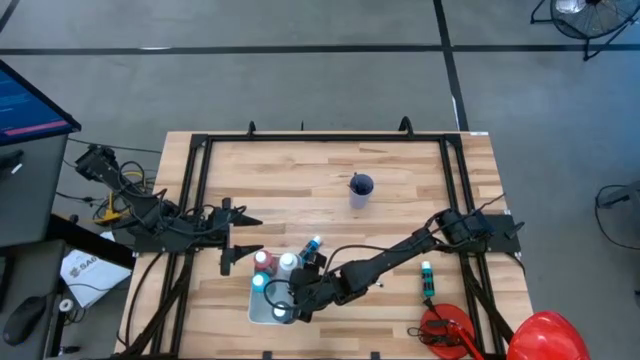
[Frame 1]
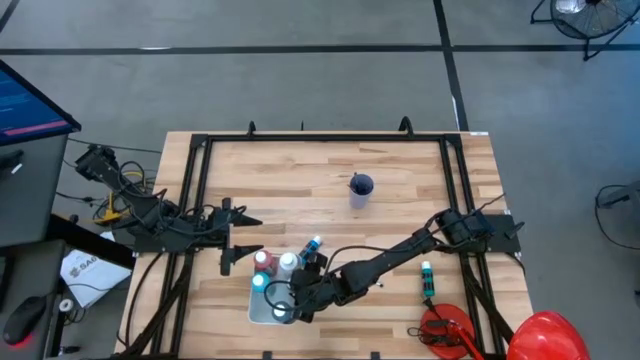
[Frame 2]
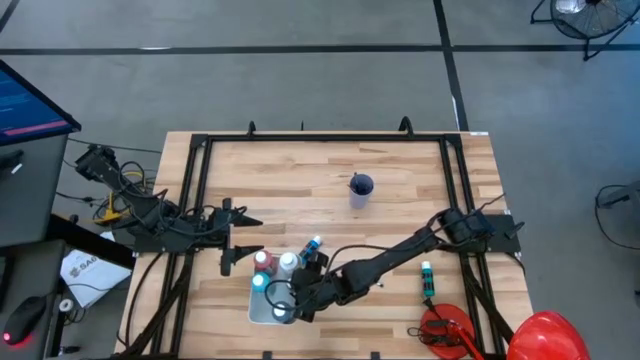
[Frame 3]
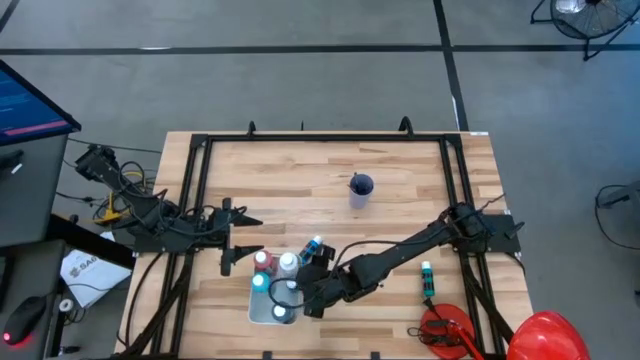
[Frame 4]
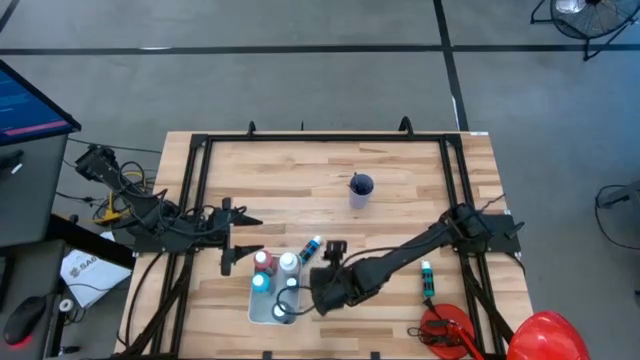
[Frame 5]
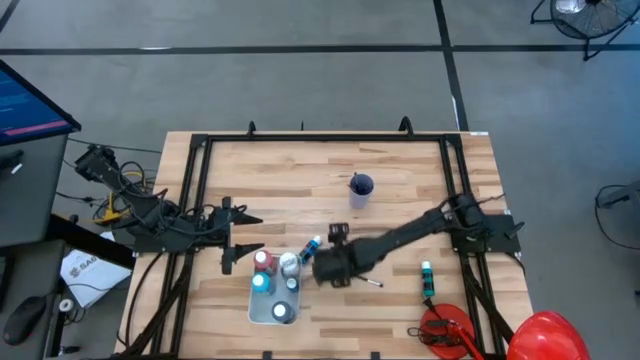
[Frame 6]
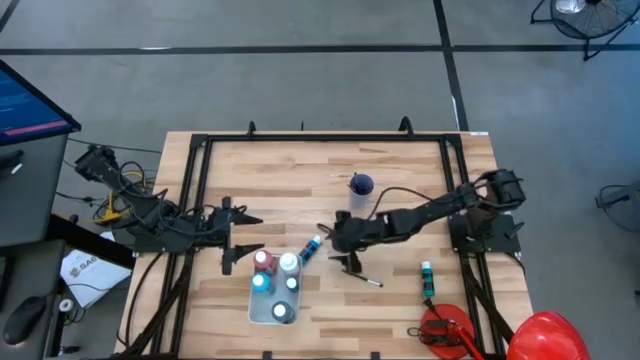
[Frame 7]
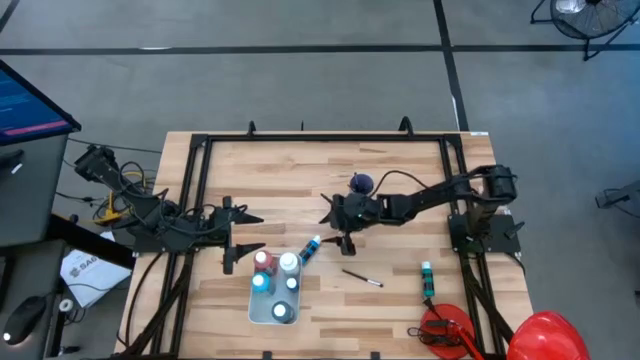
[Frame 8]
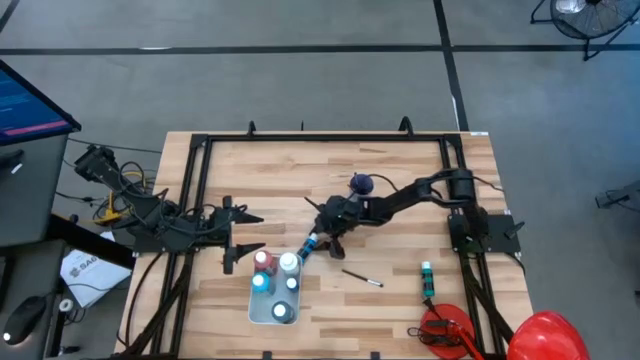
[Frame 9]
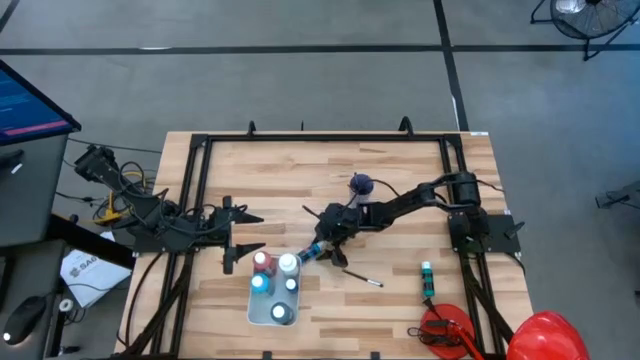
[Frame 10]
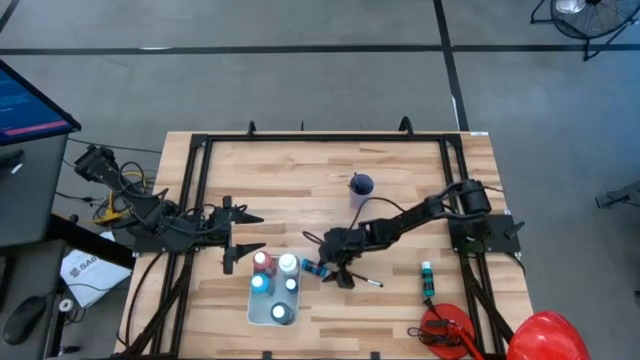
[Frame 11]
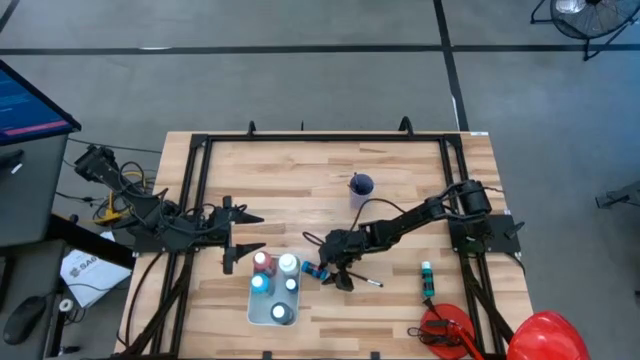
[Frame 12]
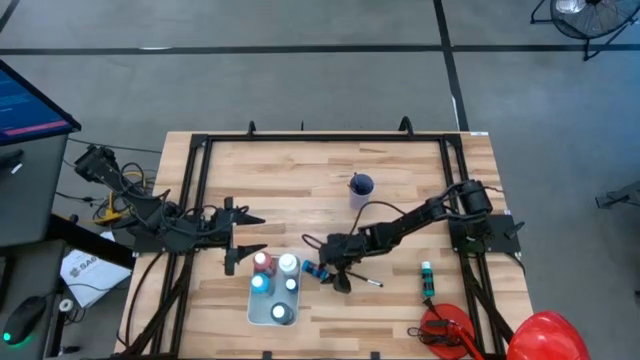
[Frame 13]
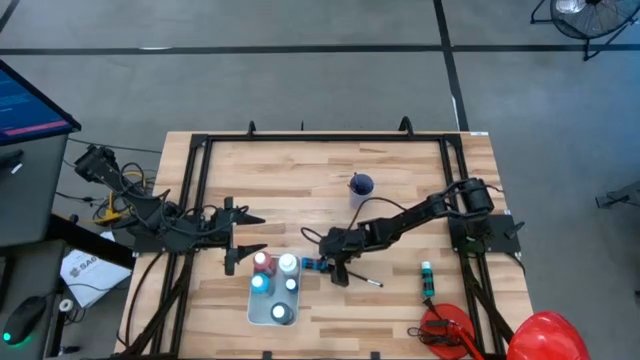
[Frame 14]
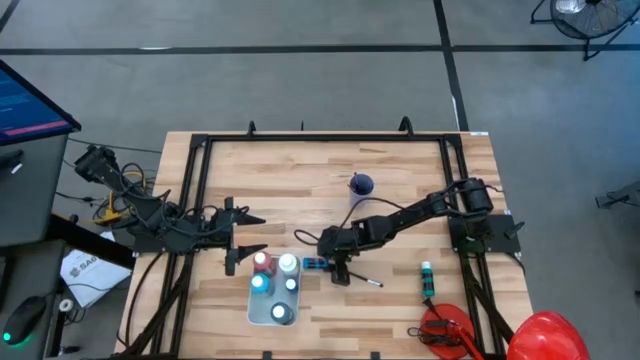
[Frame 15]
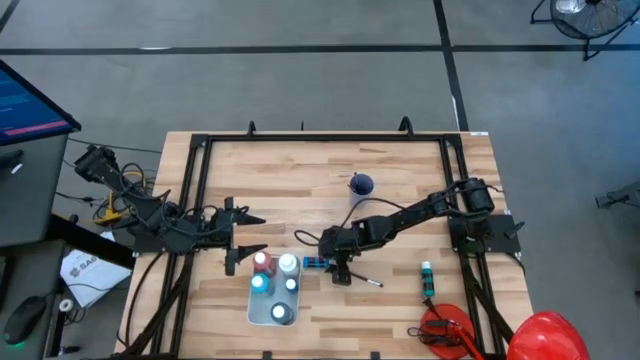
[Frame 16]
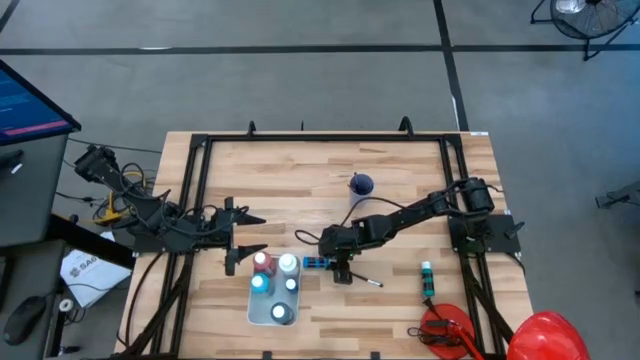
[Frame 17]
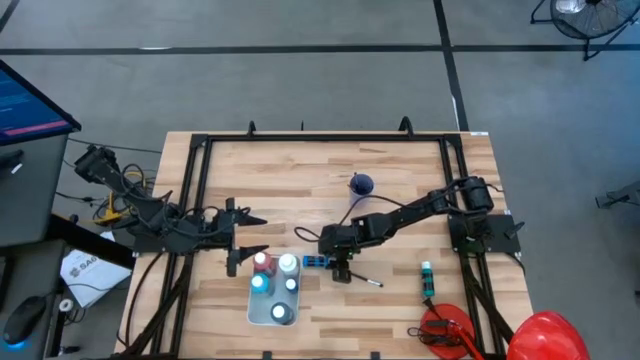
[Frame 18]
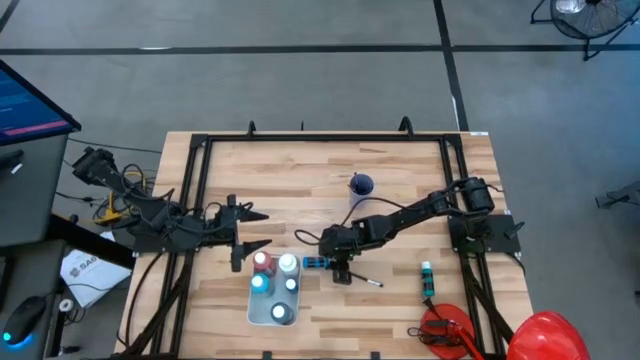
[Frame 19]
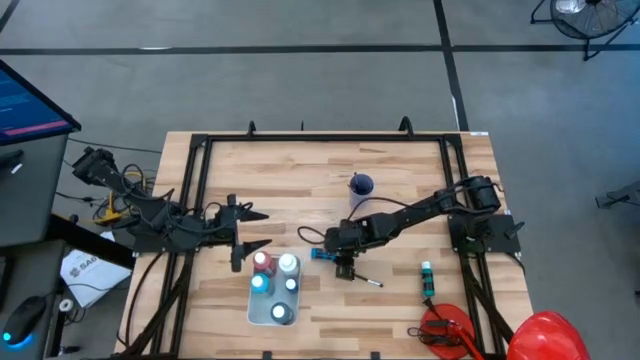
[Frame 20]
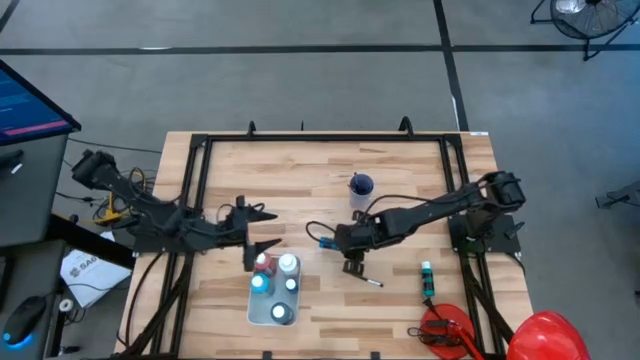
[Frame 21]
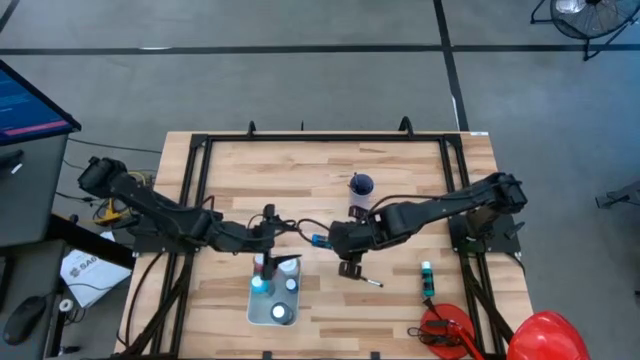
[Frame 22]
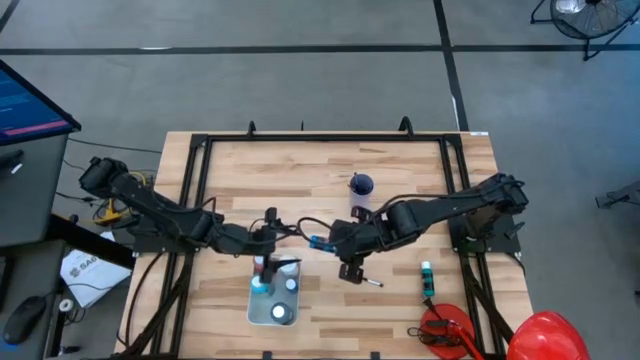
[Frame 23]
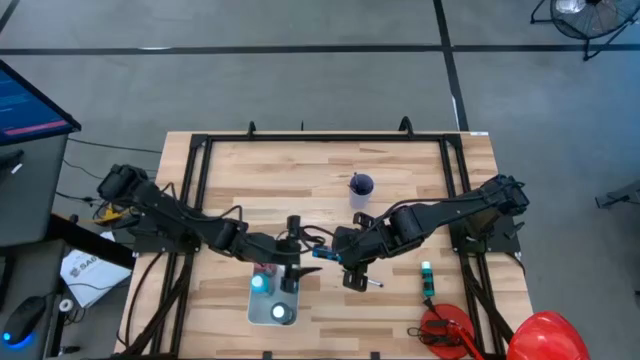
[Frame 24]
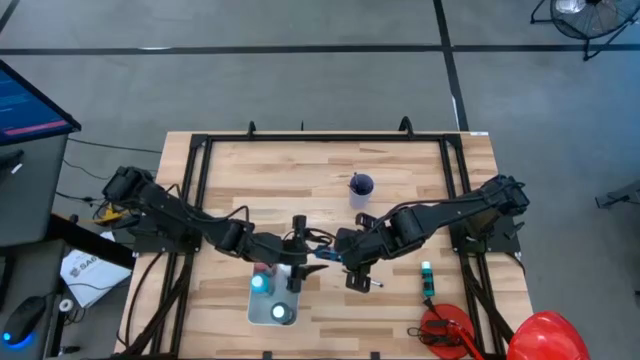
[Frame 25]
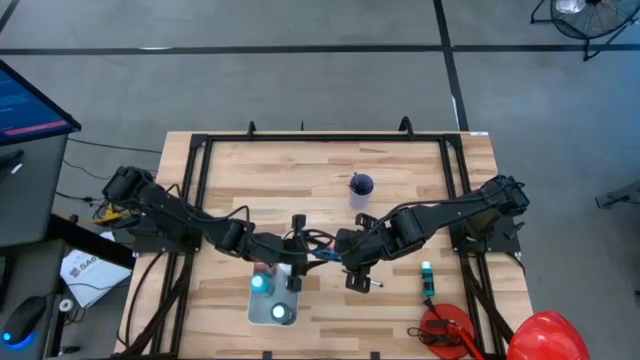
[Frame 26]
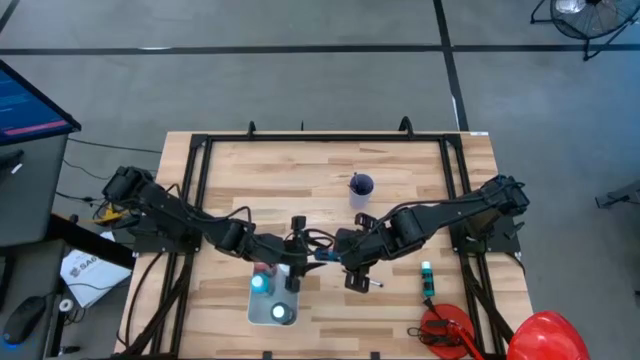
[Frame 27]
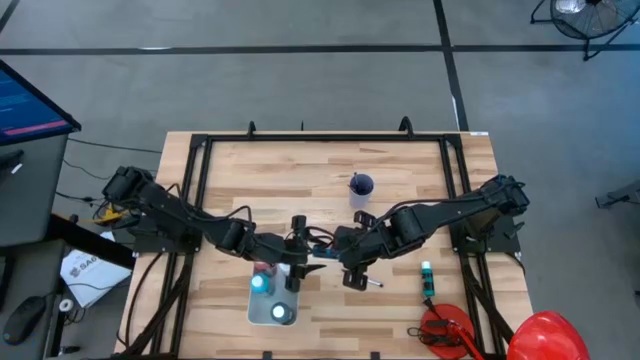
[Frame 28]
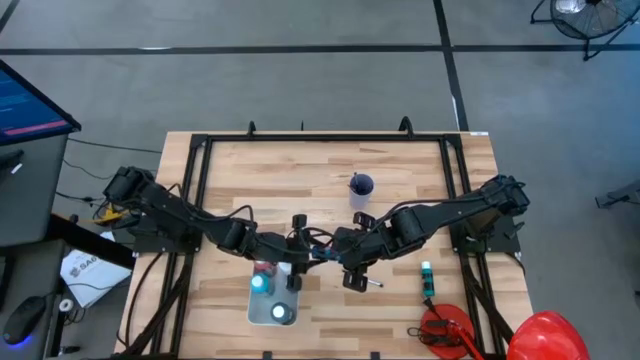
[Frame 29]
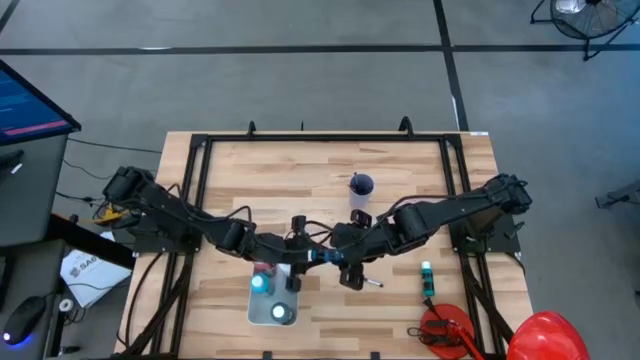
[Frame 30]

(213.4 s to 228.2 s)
Task: Pick & Place Paint Supplies
Put the black blue paint bottle into the white bin

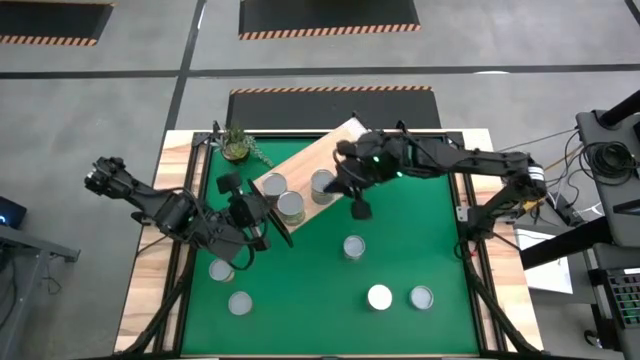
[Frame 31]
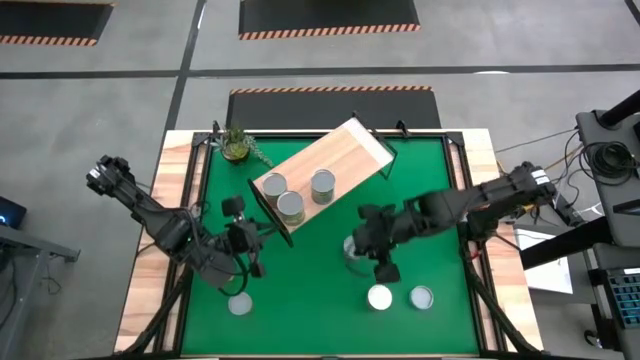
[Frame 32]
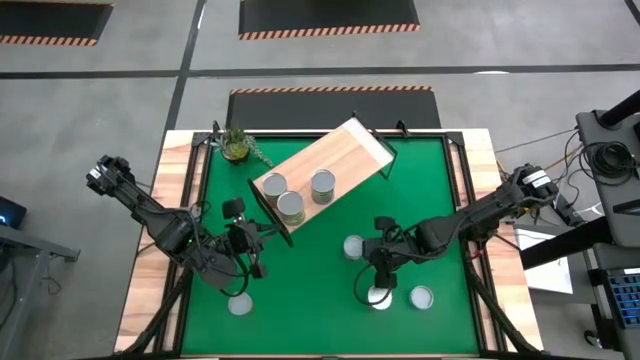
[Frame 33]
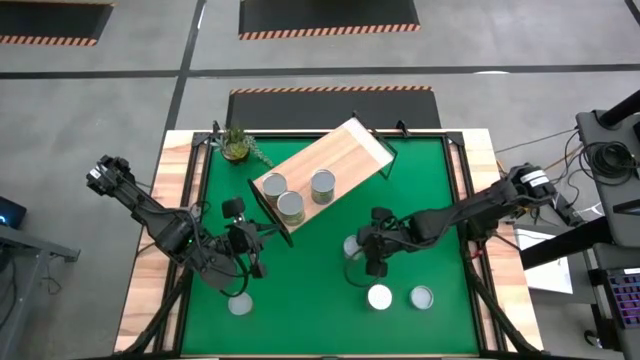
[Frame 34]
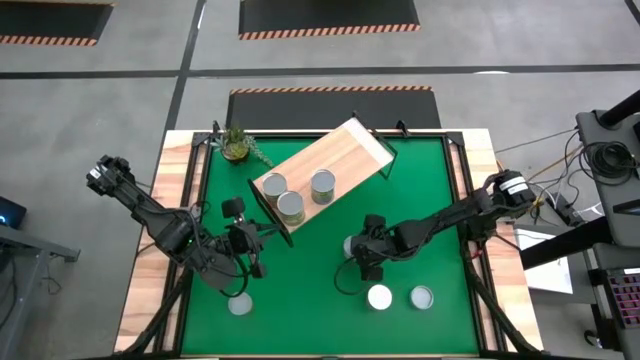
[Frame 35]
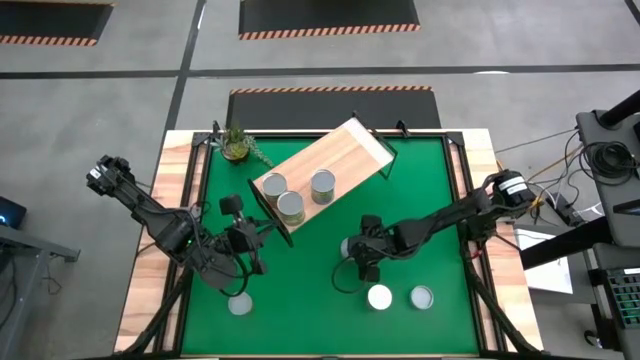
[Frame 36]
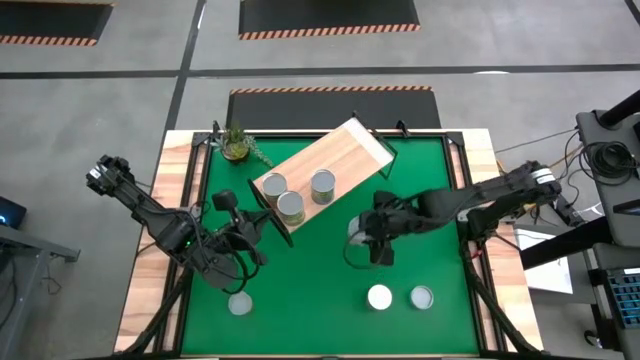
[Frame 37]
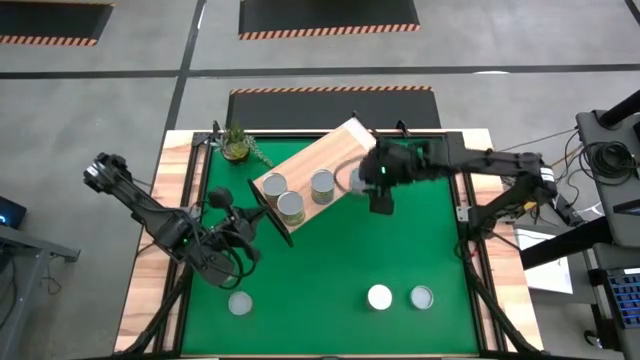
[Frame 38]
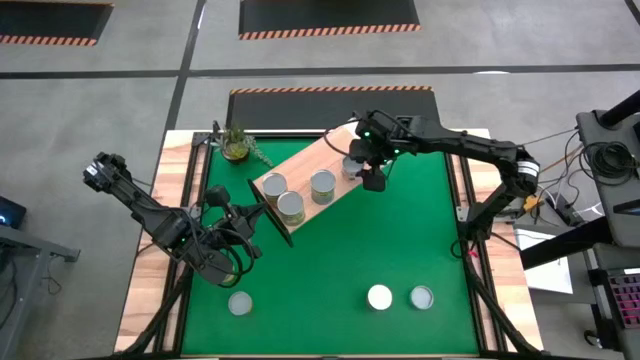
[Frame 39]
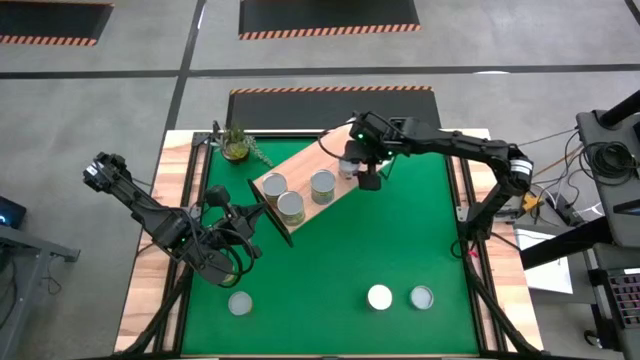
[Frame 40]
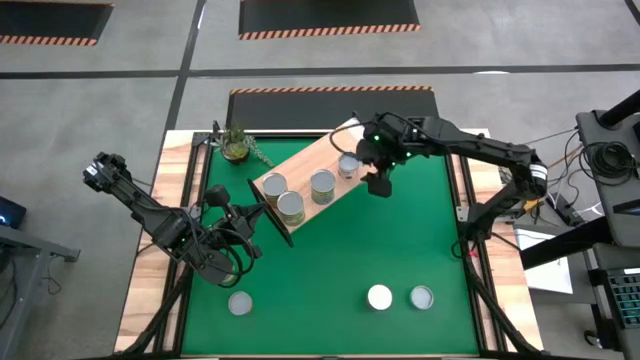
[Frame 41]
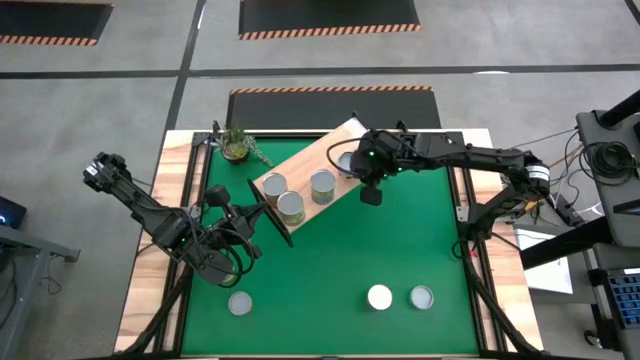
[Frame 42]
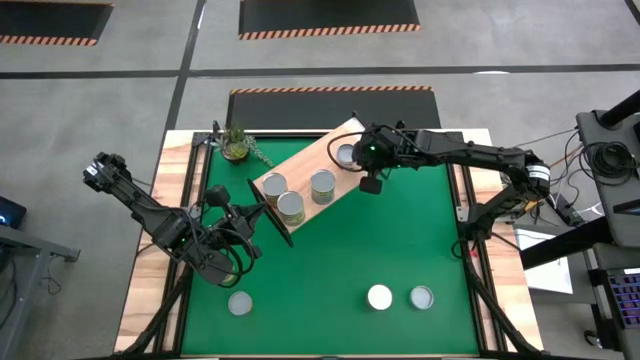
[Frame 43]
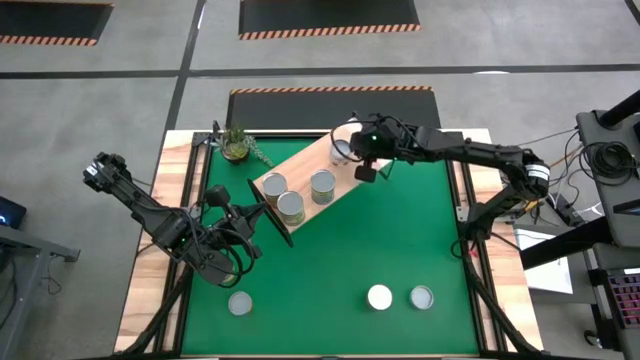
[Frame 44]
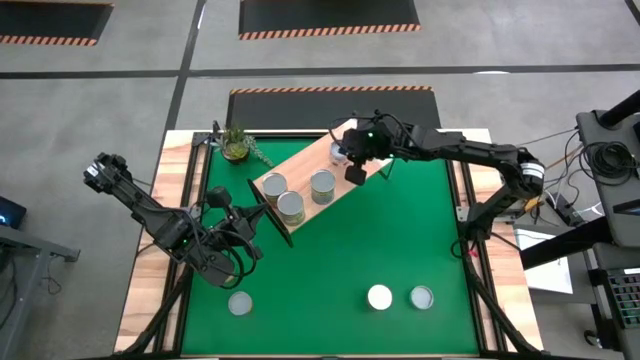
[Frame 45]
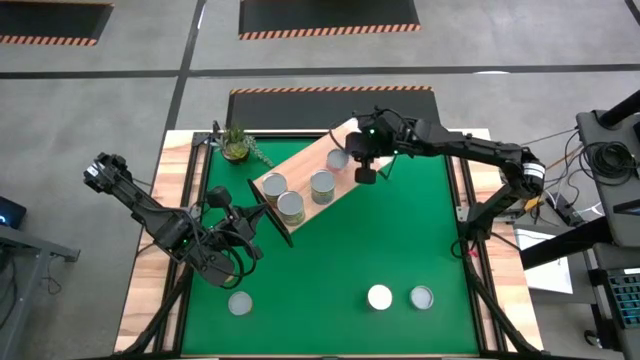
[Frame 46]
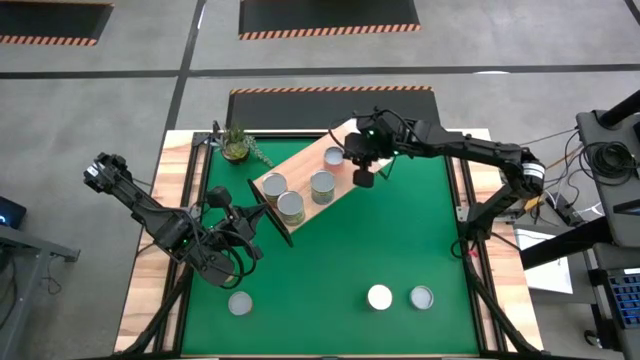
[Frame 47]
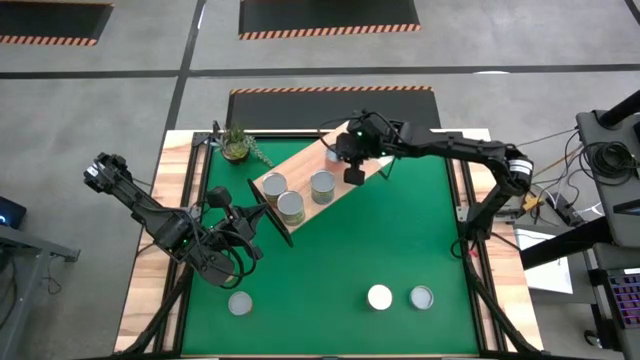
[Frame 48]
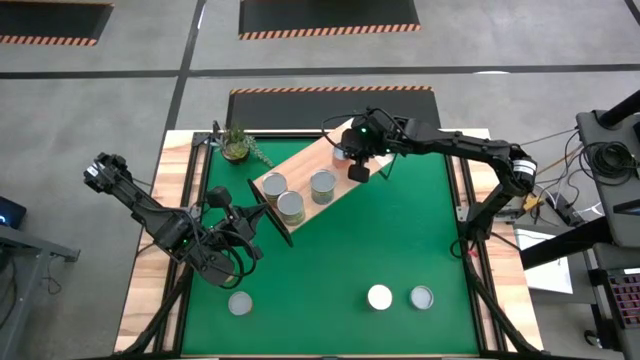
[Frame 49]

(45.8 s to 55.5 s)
Task: Pick and place cans onto a shelf
Put the white and orange can on the shelf
